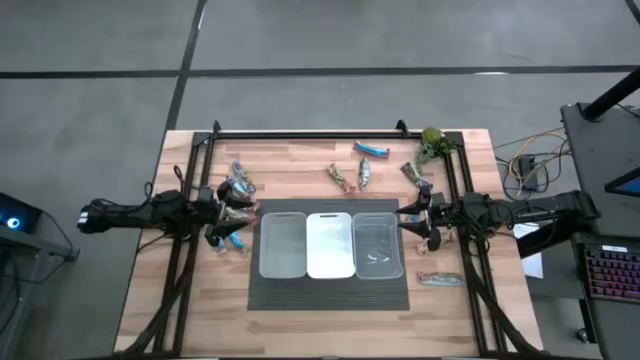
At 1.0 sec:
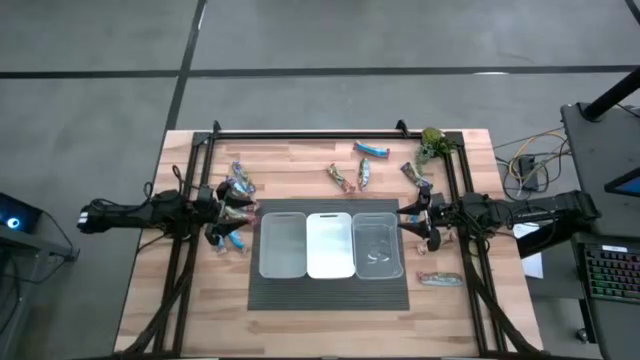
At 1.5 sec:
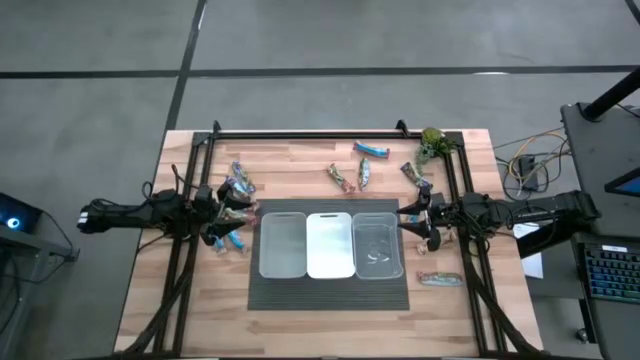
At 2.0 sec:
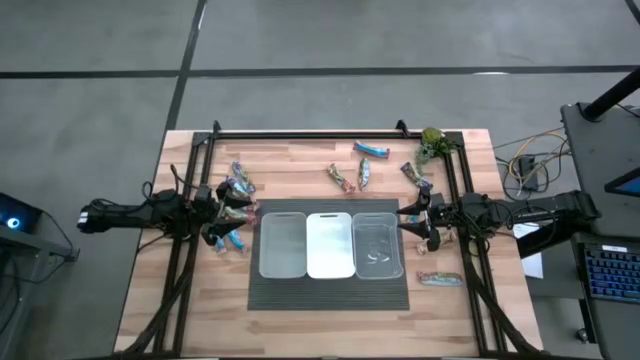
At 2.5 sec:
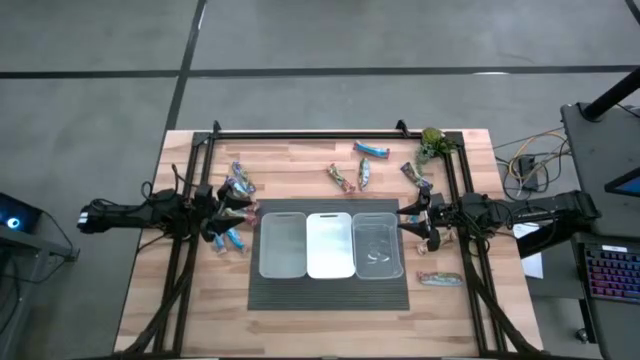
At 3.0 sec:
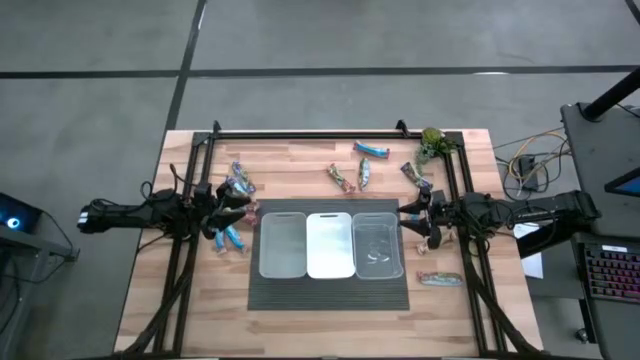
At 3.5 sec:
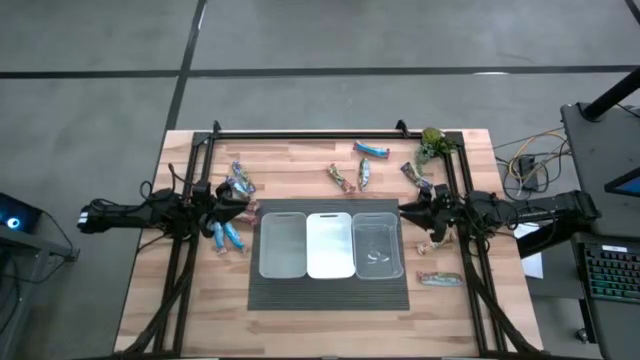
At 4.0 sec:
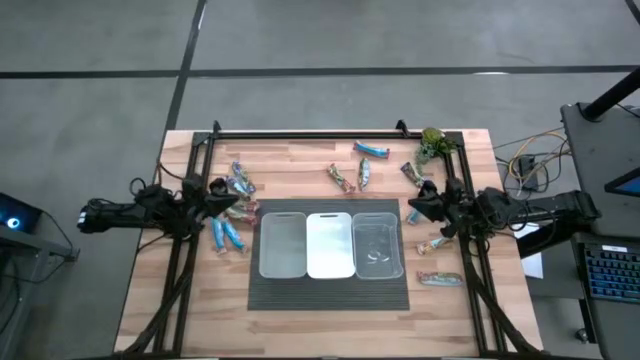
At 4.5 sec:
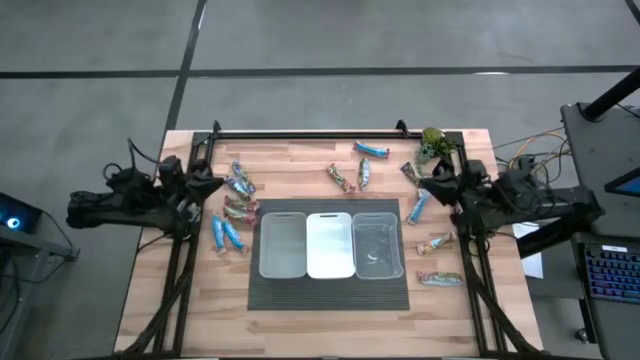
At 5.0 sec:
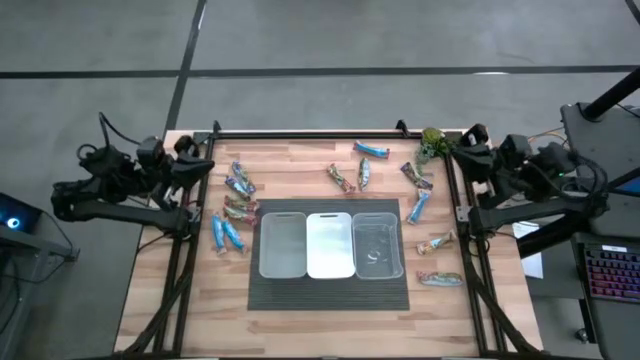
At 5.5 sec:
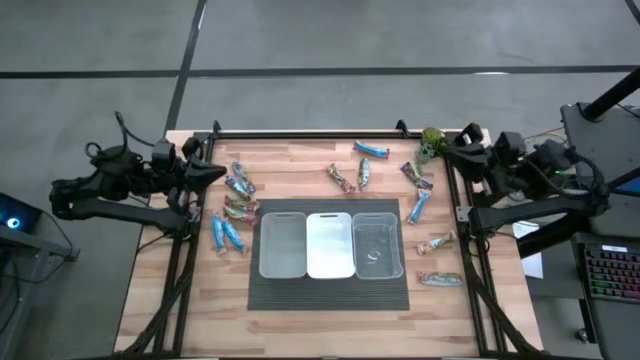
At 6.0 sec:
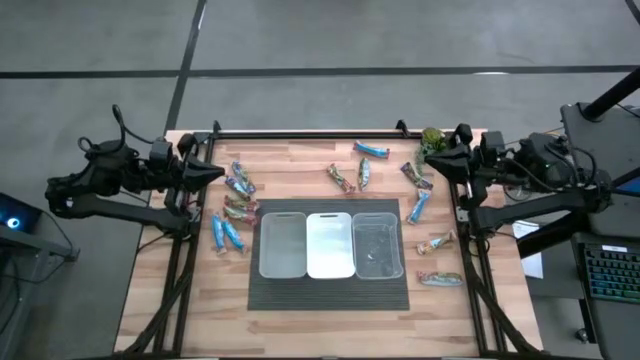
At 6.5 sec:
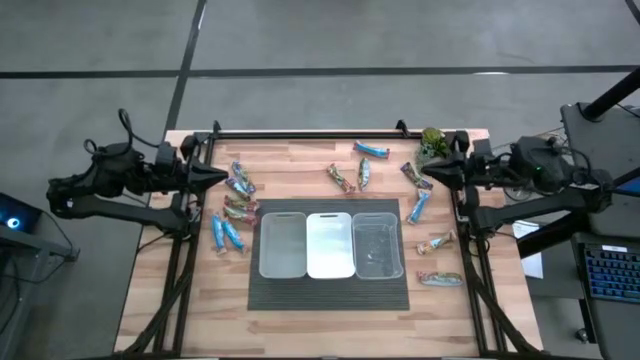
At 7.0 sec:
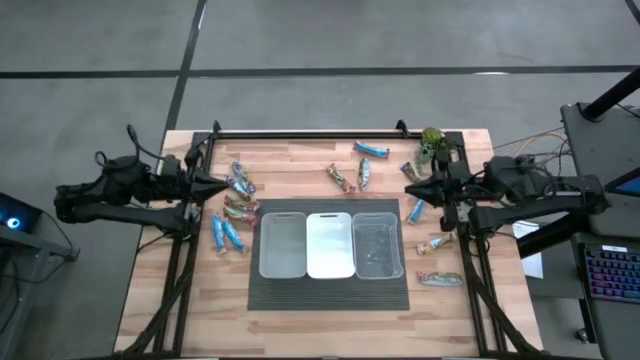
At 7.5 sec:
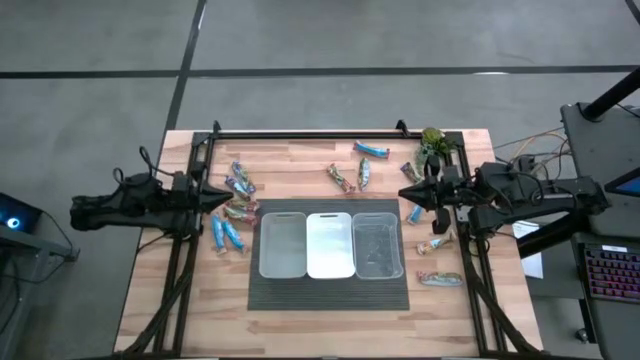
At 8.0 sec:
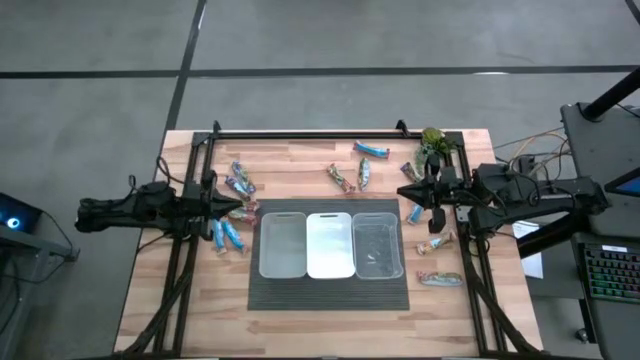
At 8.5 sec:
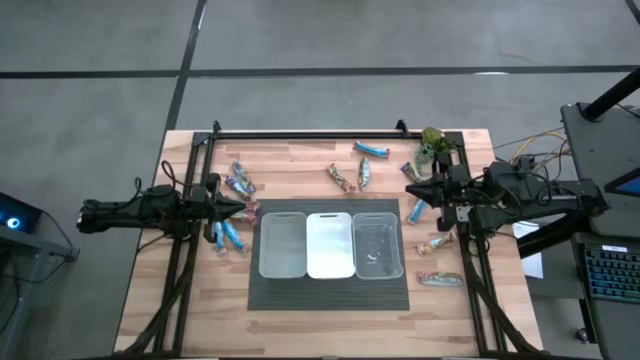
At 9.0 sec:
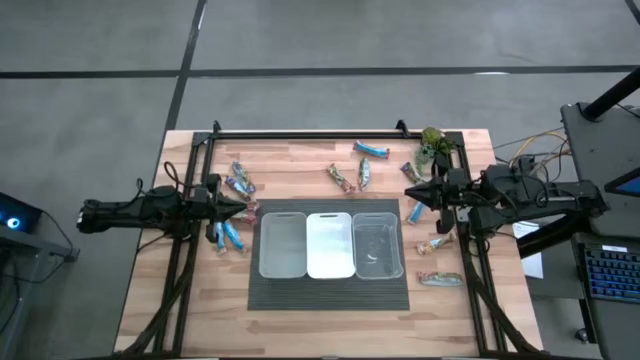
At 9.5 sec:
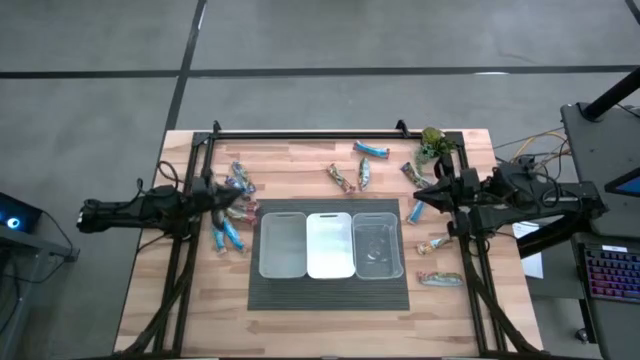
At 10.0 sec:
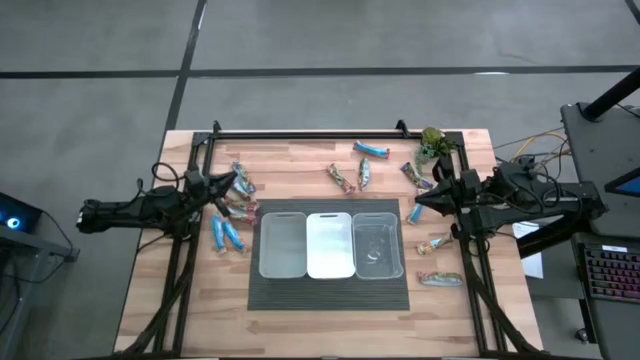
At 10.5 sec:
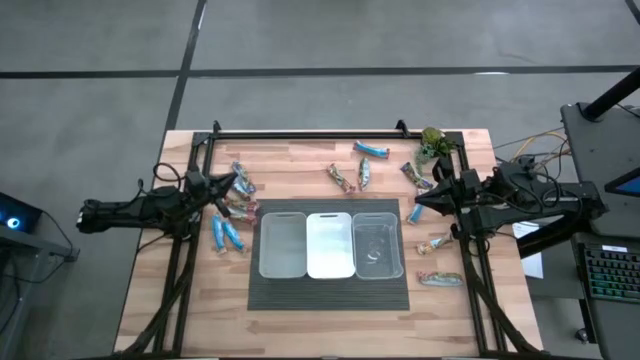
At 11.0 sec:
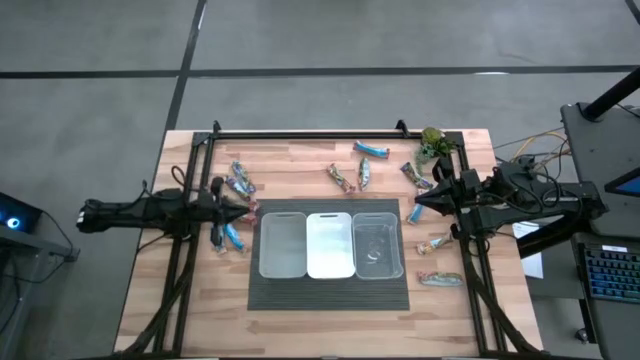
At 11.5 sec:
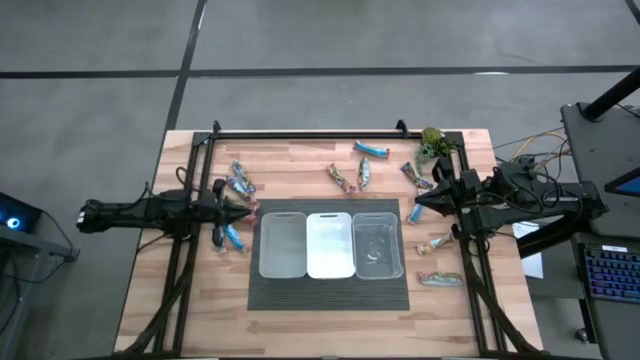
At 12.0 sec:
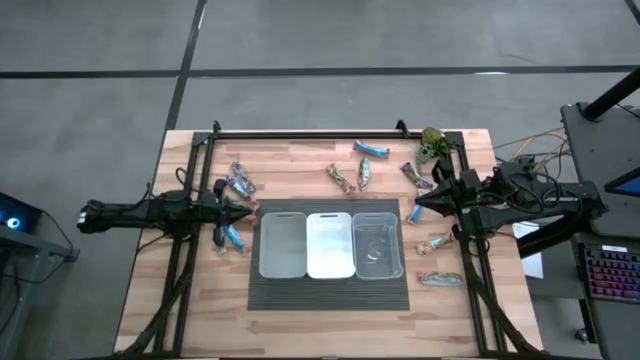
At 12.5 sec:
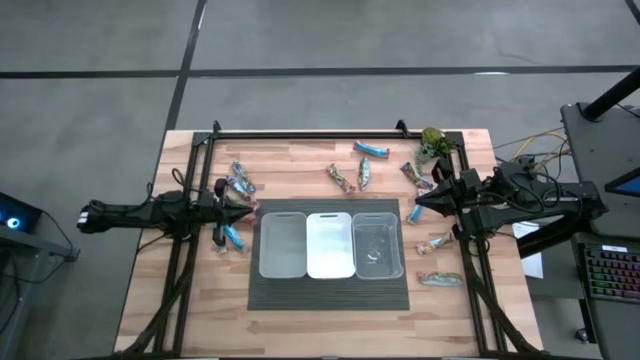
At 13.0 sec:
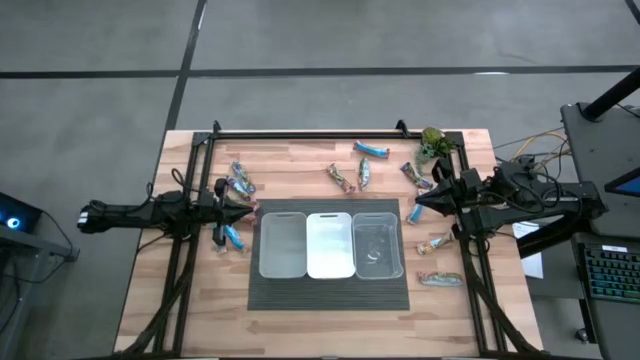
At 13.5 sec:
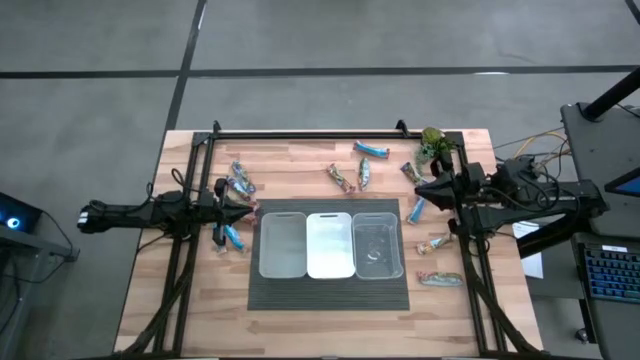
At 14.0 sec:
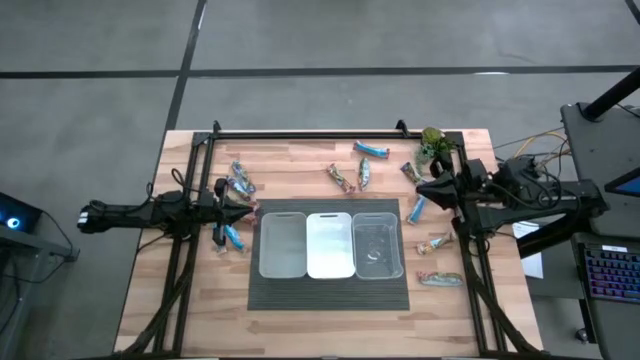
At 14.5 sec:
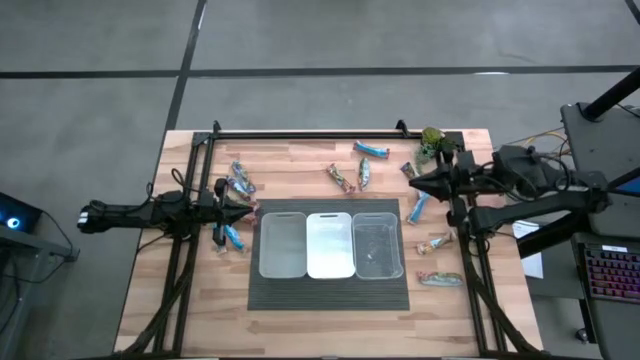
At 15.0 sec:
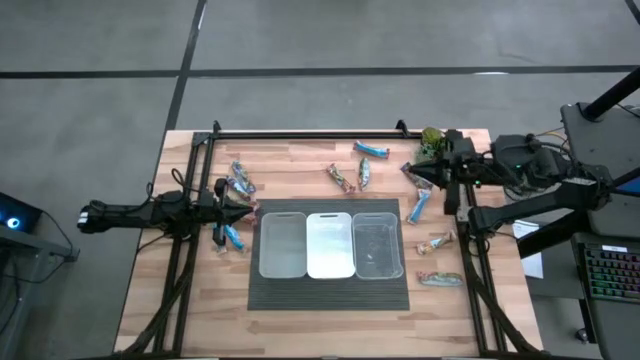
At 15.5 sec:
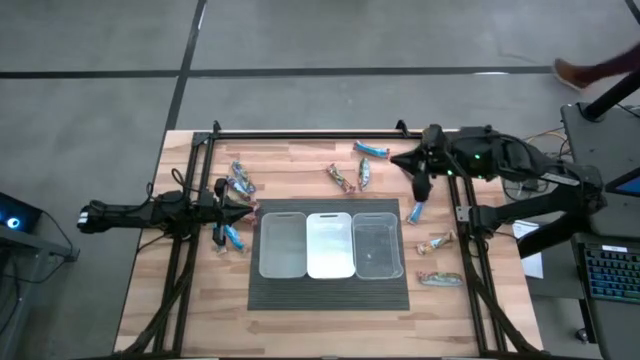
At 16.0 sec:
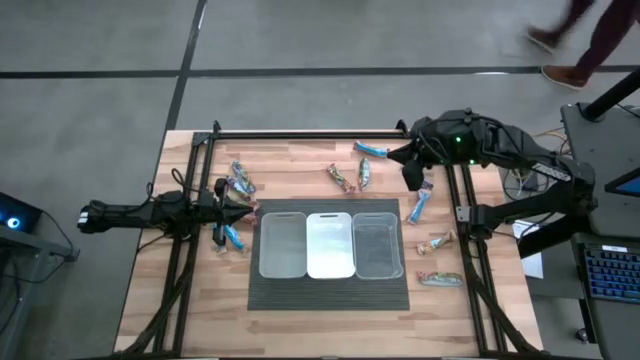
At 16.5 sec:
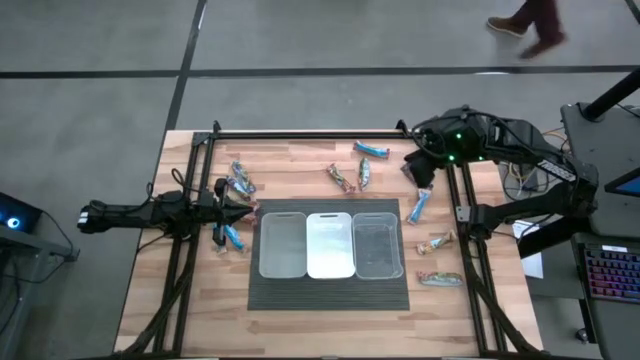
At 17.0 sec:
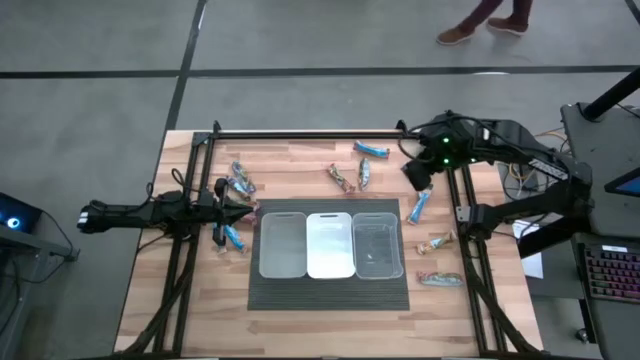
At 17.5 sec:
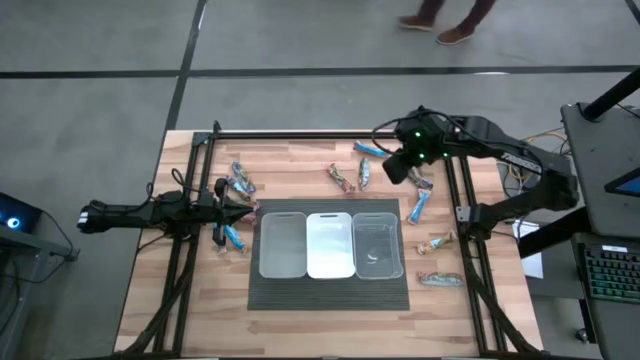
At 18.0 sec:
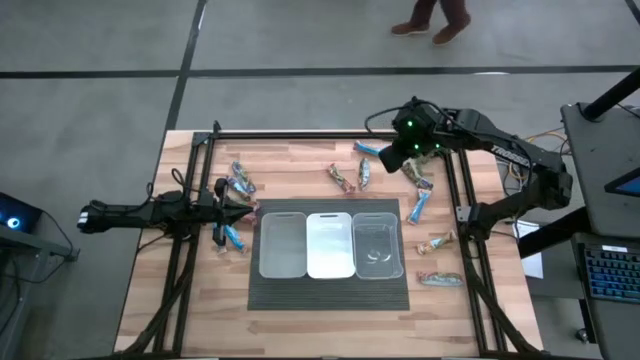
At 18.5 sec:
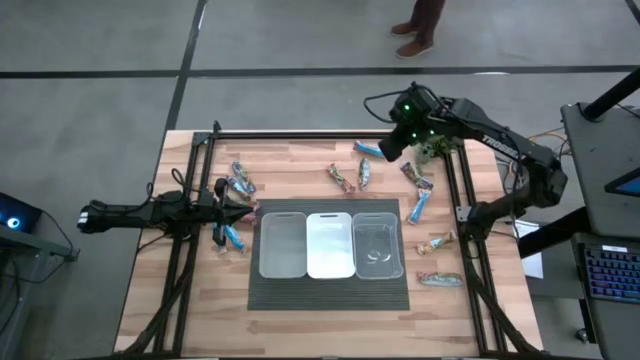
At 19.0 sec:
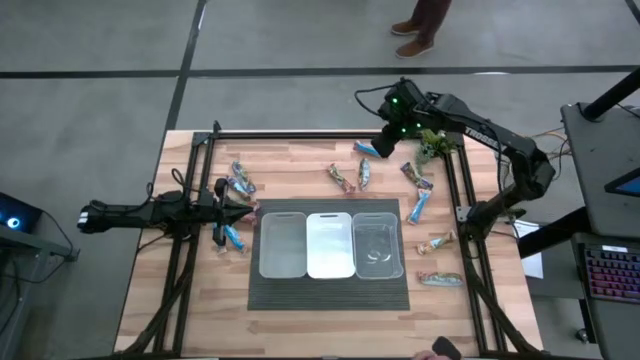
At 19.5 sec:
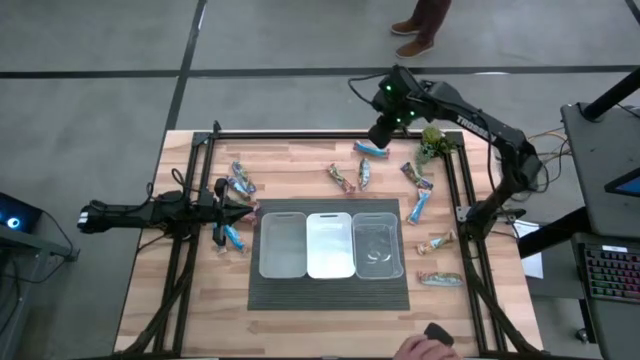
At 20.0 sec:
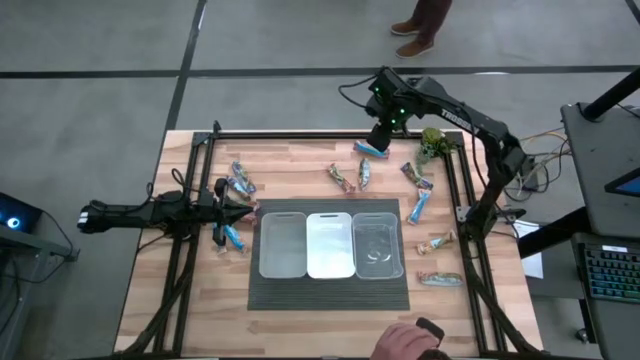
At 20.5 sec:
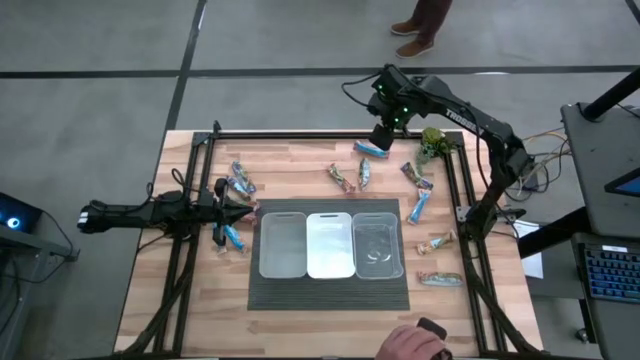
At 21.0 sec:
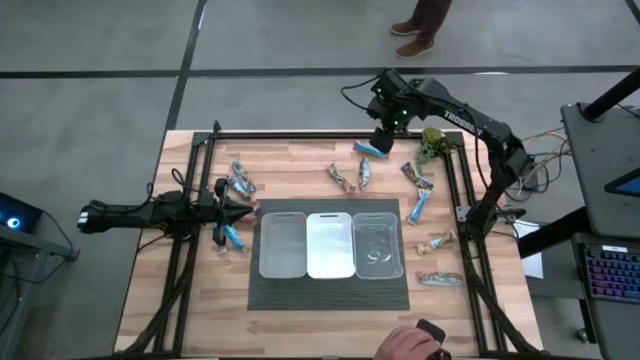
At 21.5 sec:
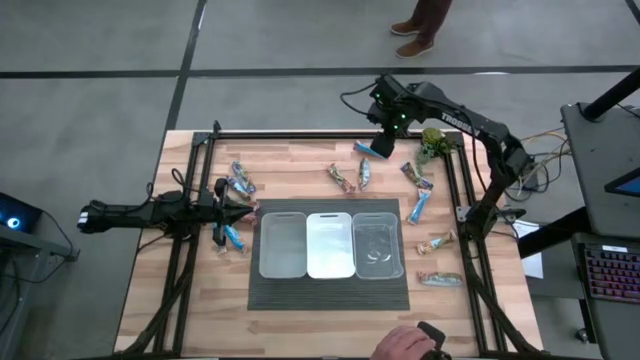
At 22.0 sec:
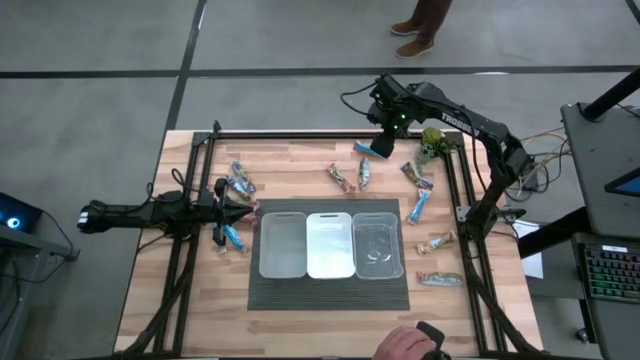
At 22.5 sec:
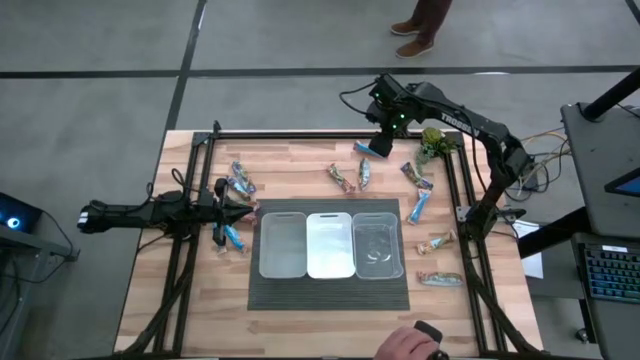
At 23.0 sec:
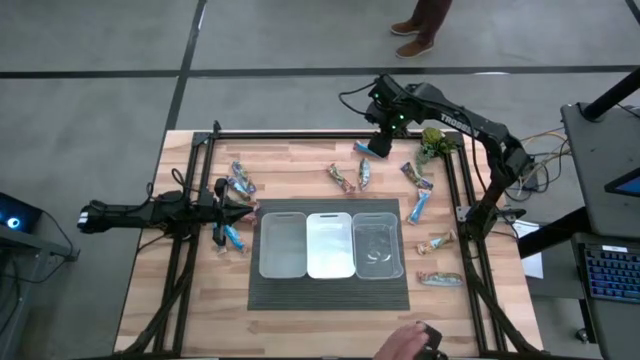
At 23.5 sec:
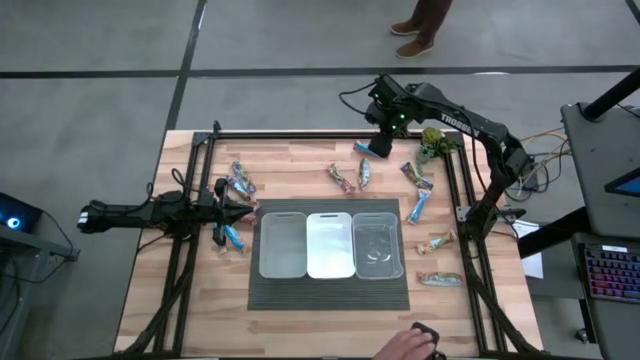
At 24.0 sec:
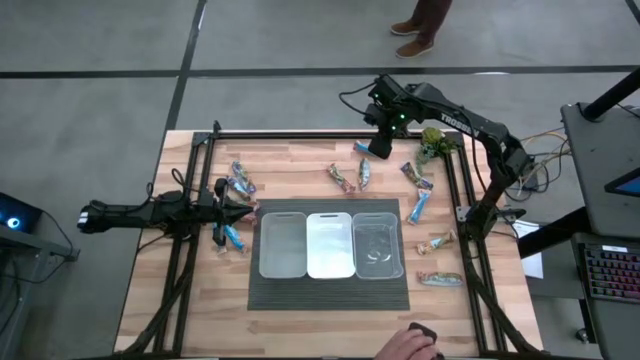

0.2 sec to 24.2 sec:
Task: Pick and place Granola Bars by type
Put the red granola bar into the gray bin
